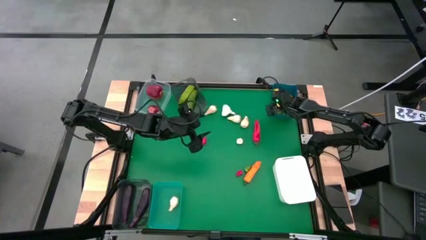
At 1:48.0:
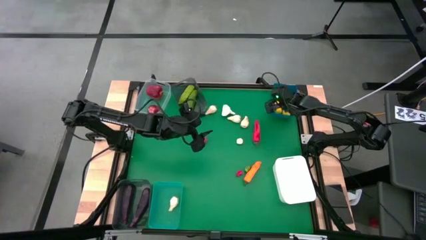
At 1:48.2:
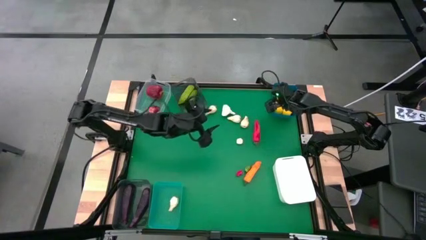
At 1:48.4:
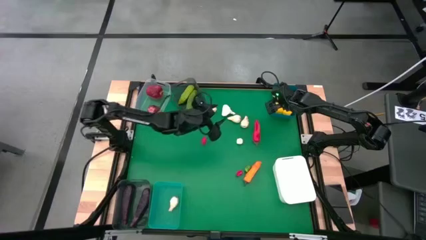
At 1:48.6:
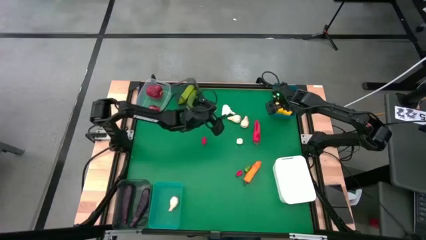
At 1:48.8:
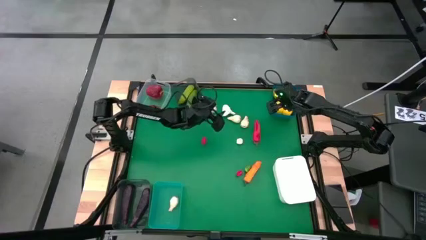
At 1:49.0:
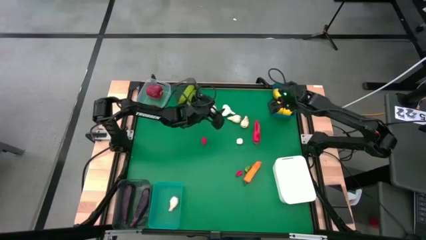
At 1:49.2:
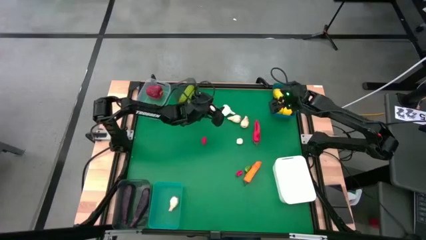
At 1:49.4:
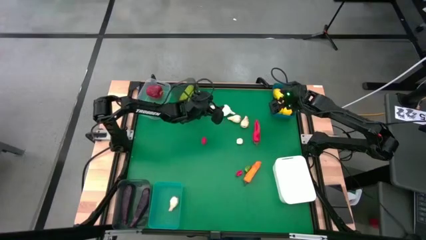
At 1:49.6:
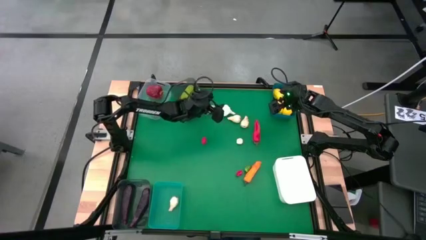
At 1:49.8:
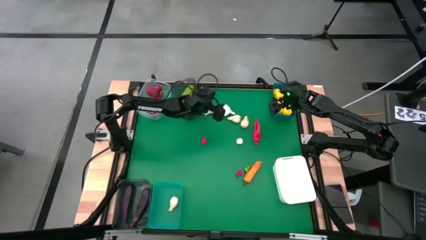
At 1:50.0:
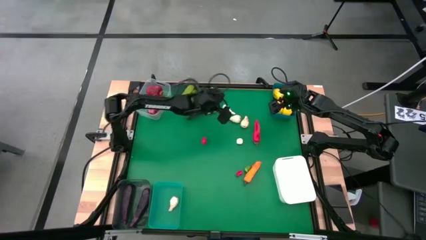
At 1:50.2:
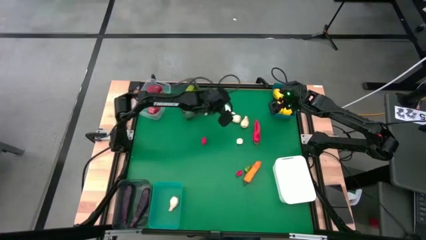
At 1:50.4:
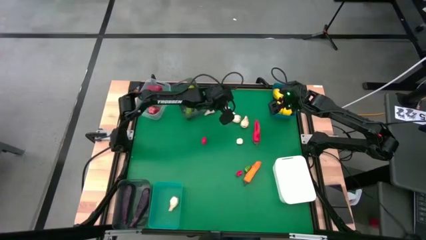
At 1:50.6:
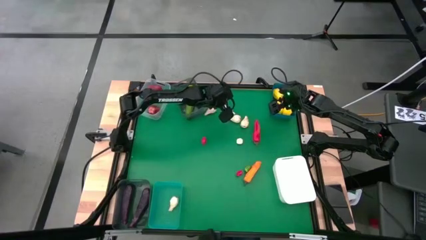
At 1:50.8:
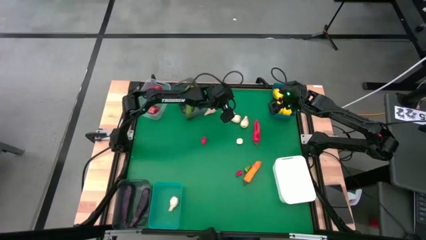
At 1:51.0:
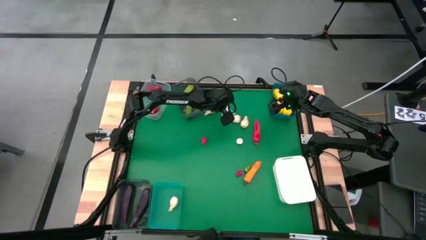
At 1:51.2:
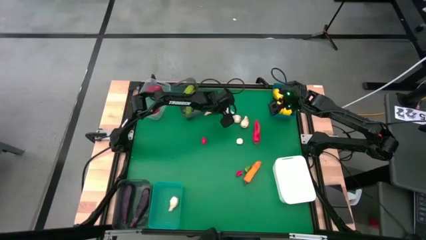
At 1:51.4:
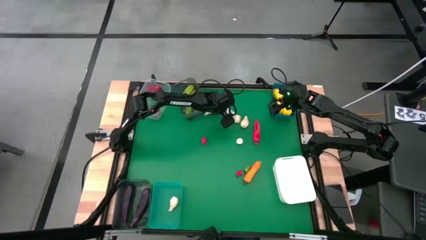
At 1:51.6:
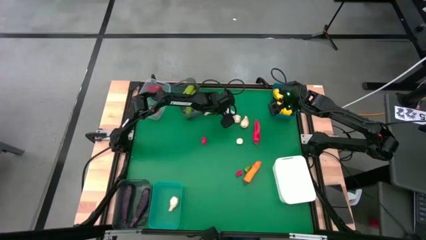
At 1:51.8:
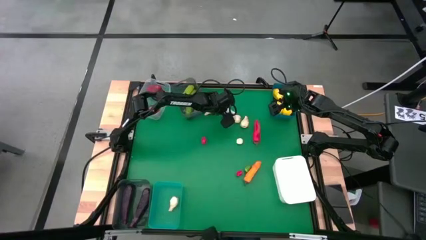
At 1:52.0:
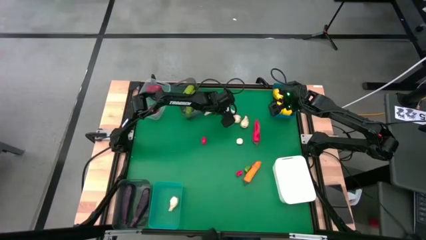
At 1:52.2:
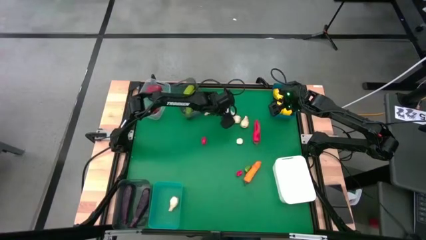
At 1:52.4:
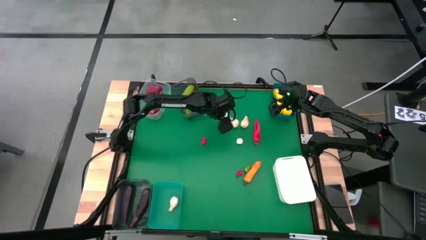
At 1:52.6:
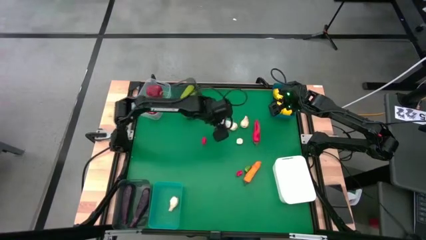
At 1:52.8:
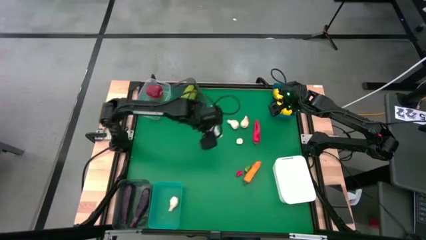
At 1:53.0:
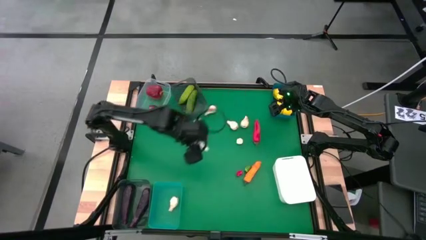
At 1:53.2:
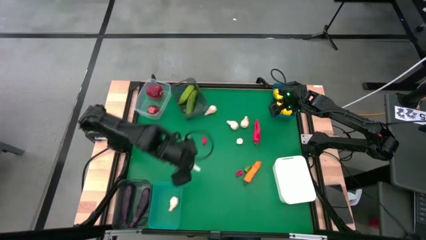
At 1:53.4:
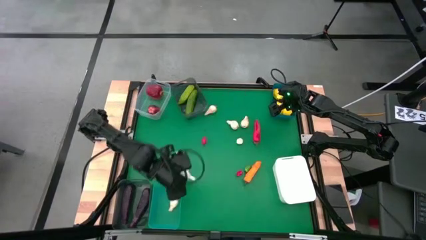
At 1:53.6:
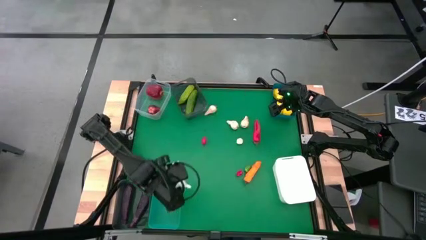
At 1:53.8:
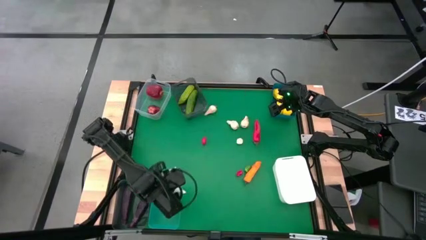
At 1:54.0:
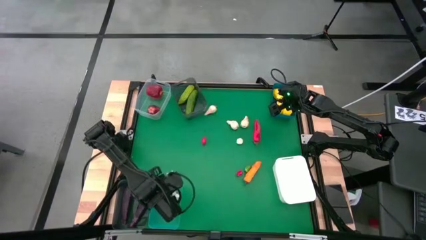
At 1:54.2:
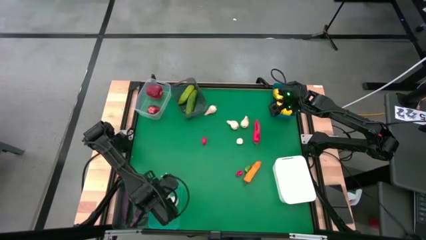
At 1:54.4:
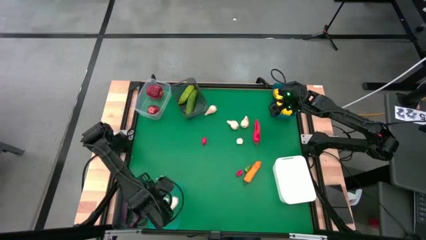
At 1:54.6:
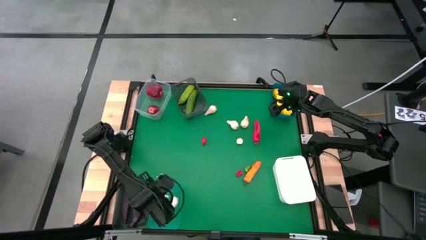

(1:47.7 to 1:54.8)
Task: Sort produce into baskets
Put the garlic into the green bin

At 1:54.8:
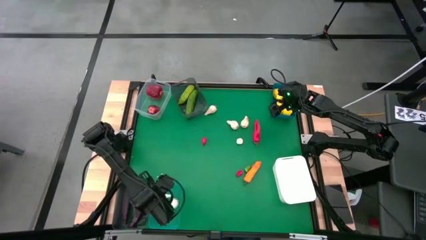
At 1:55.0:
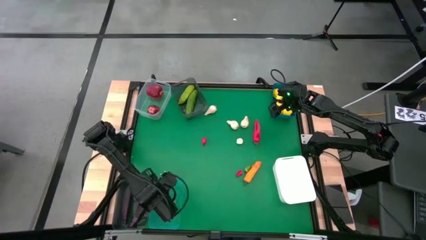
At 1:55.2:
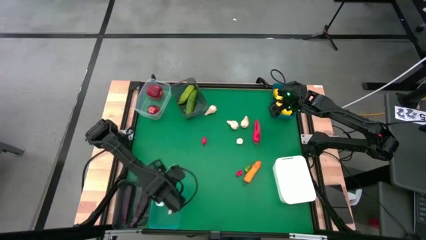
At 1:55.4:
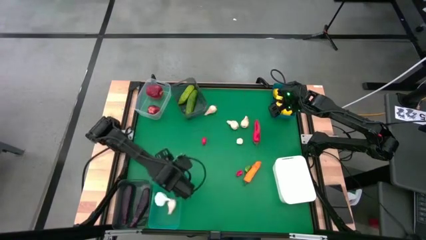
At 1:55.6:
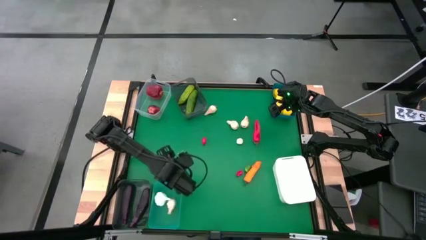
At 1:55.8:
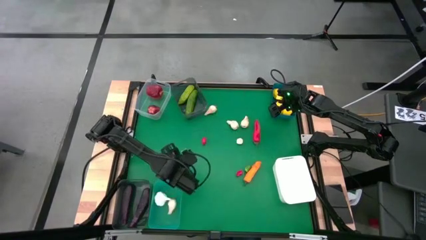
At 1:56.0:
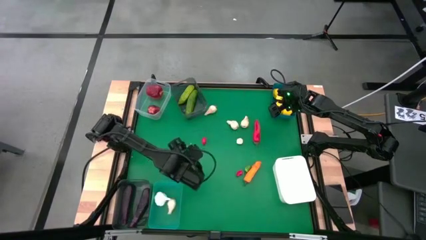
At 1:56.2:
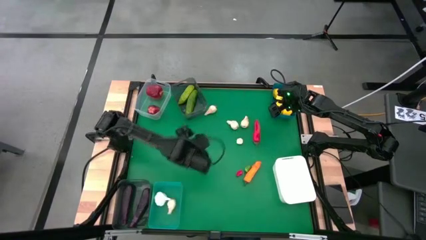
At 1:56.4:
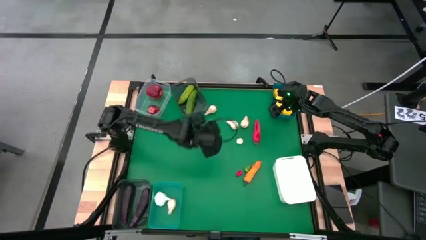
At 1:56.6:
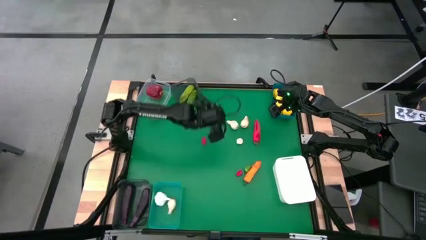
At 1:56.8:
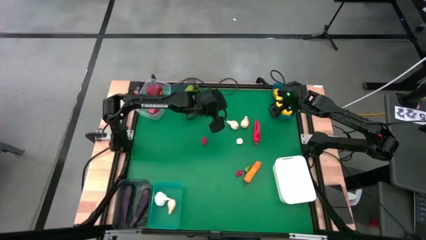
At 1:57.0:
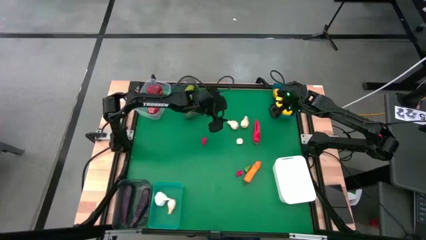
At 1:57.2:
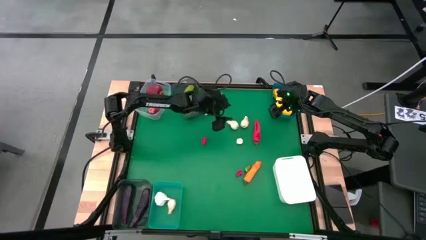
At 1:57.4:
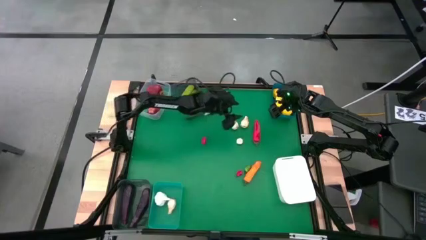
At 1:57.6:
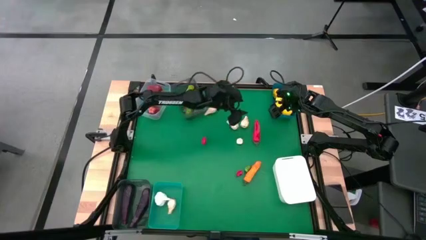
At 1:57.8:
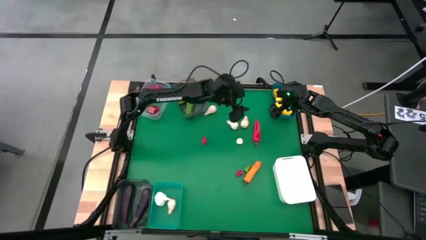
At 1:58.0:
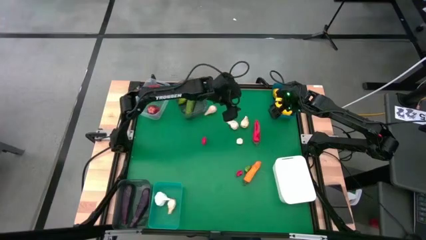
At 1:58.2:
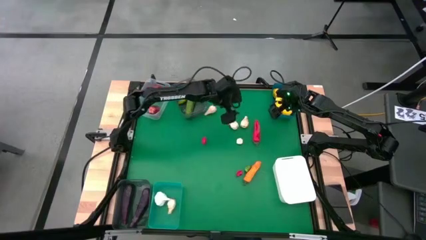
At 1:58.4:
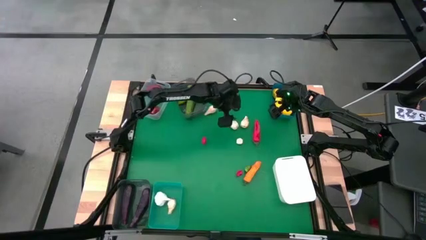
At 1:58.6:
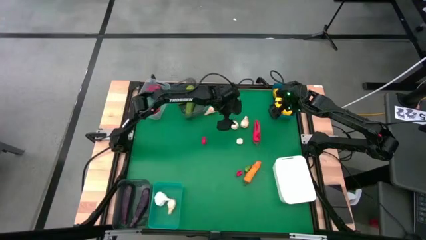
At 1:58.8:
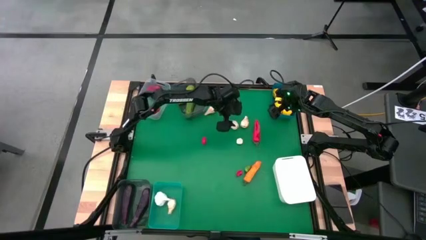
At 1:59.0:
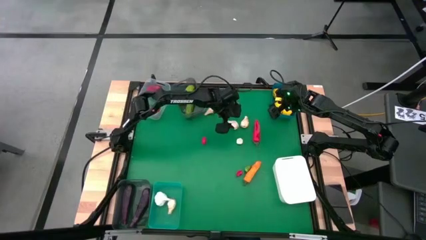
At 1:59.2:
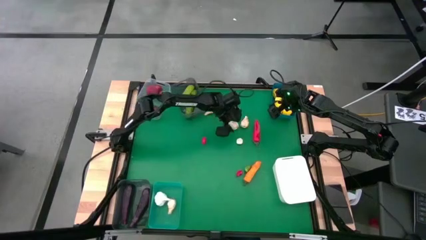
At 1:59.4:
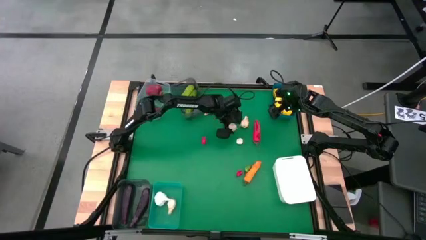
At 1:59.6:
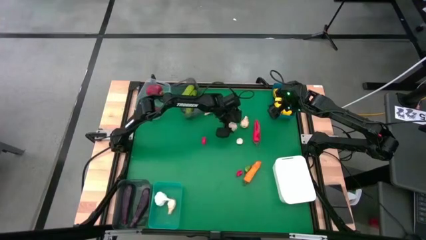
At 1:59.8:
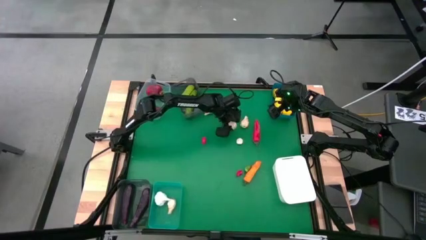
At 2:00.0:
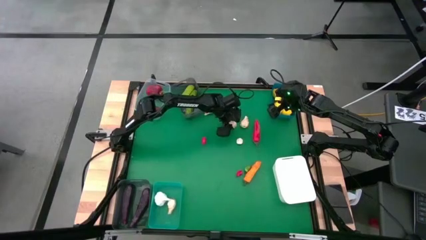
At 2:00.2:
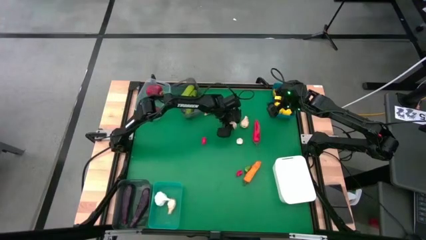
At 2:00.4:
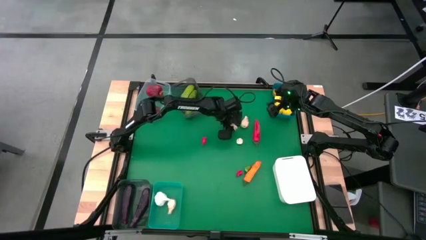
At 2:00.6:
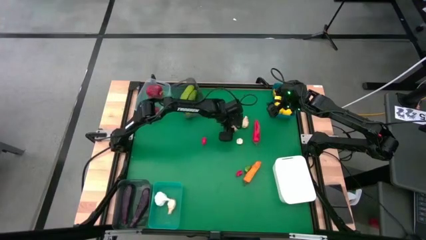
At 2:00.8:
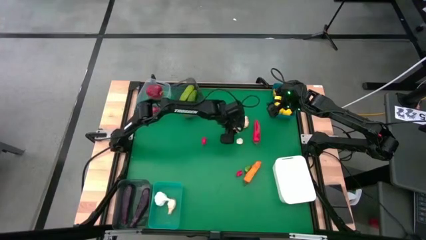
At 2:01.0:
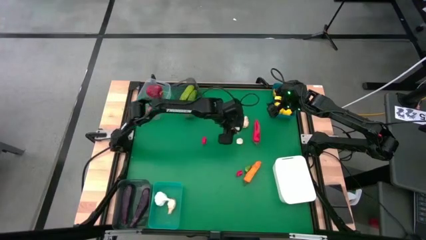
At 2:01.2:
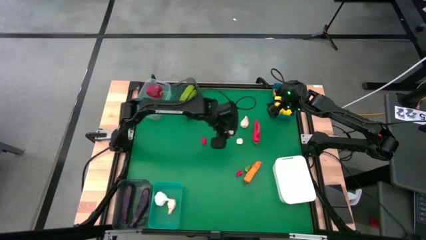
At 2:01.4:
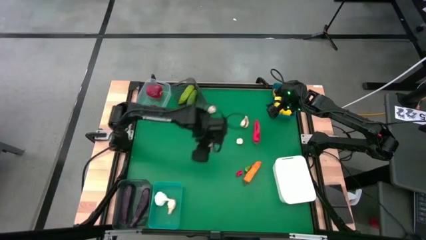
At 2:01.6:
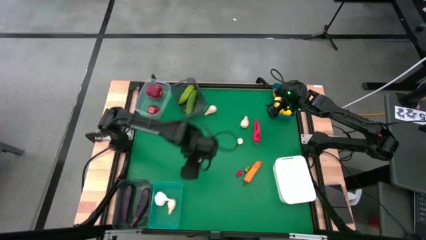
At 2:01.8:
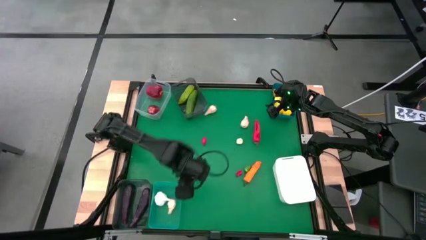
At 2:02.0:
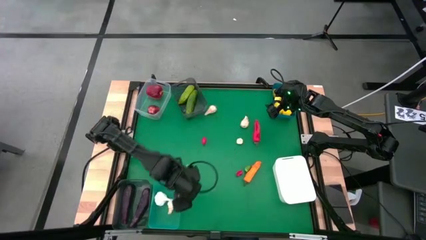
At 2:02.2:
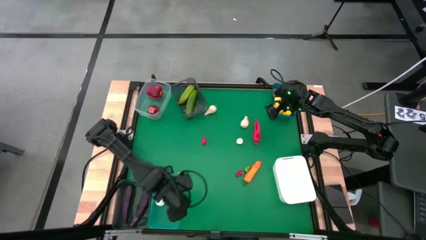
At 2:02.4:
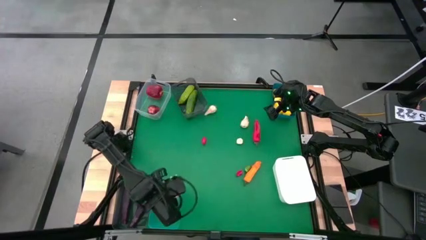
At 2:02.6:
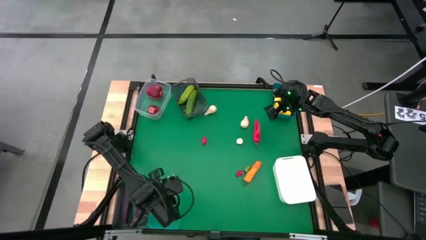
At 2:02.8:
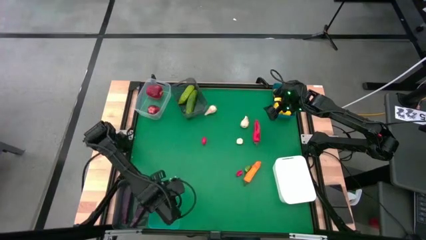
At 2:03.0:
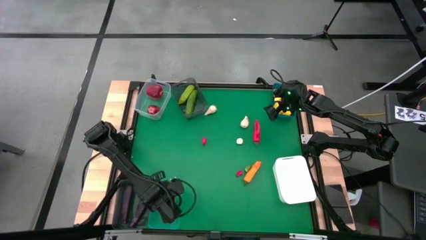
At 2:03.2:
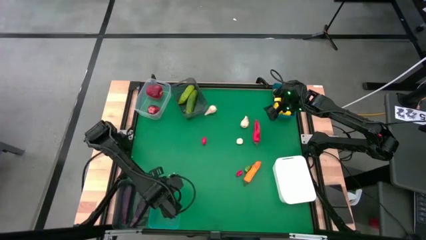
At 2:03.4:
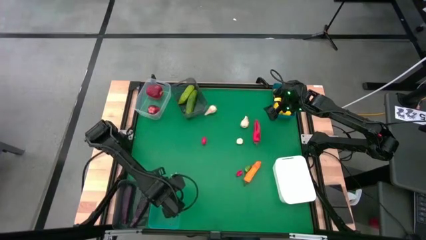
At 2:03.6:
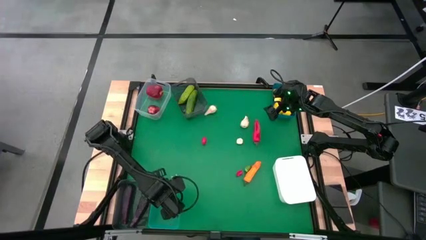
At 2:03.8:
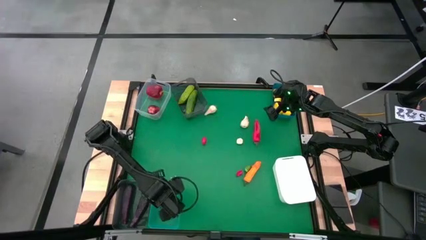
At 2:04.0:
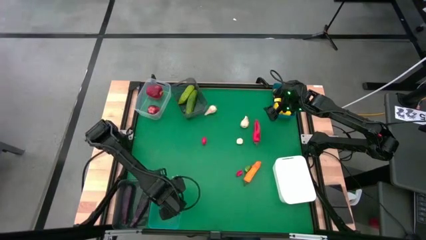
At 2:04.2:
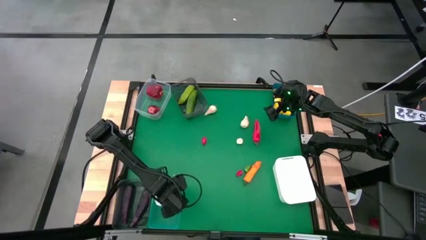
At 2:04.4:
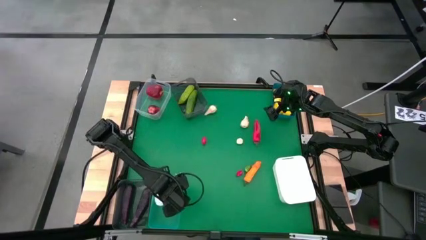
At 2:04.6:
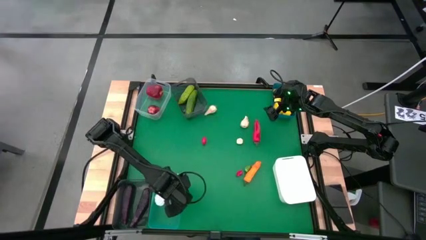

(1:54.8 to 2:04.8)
Put the garlic into the green bin
